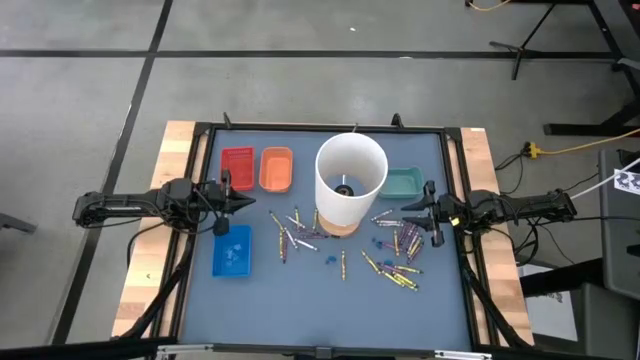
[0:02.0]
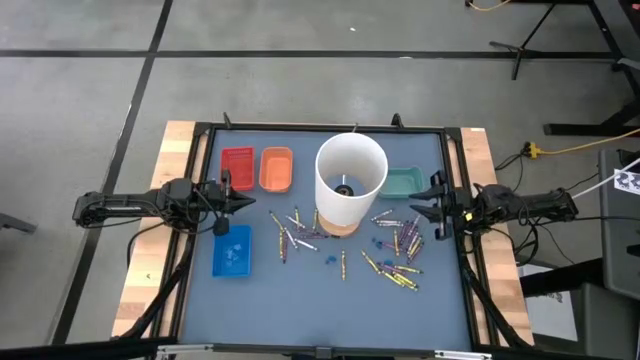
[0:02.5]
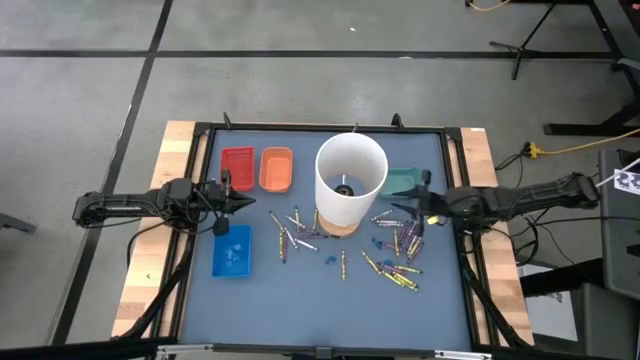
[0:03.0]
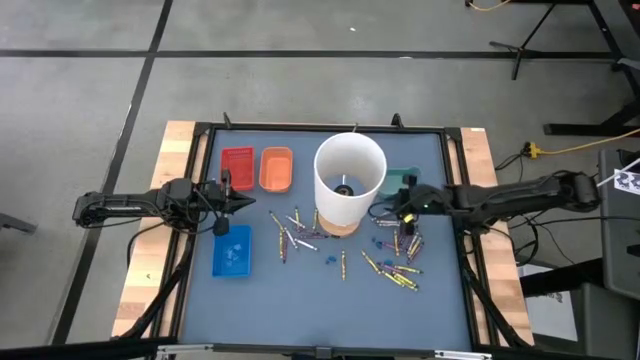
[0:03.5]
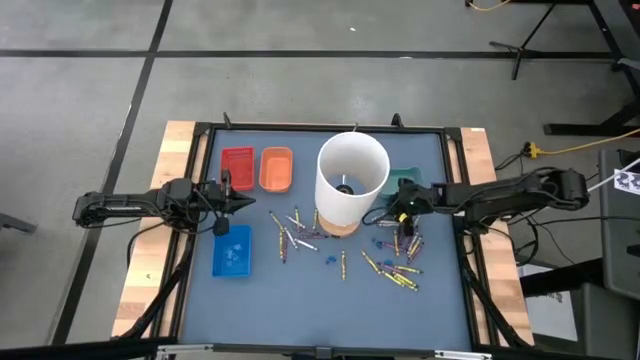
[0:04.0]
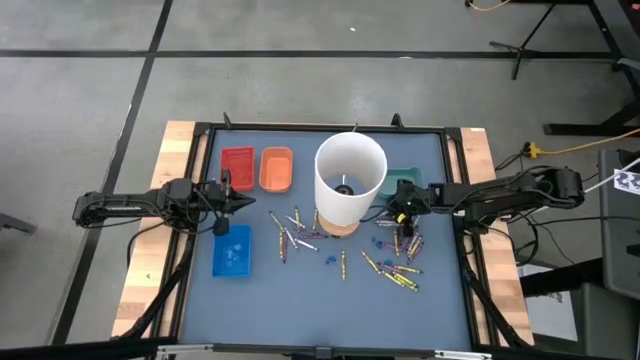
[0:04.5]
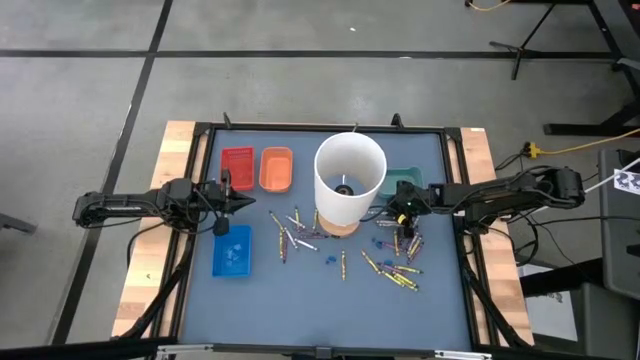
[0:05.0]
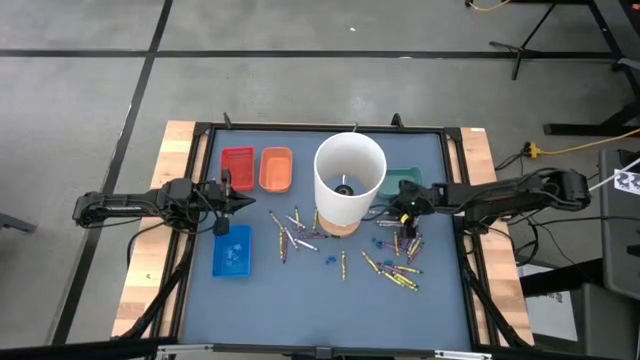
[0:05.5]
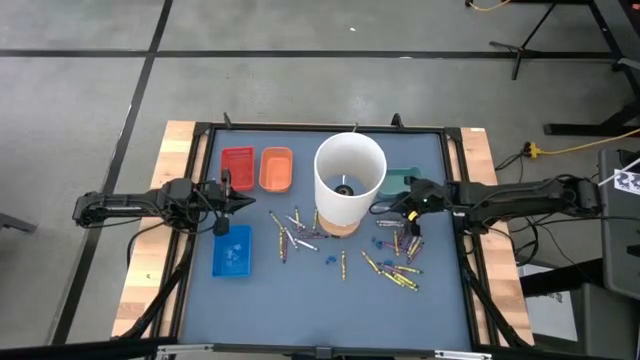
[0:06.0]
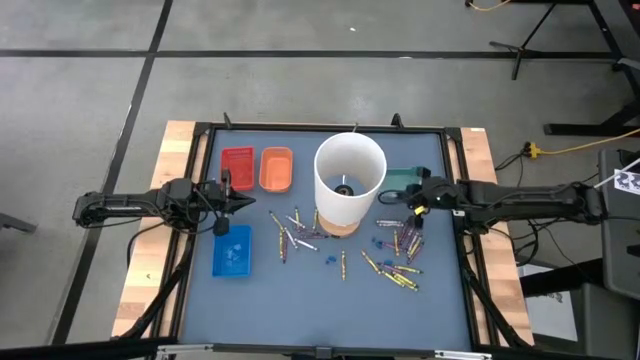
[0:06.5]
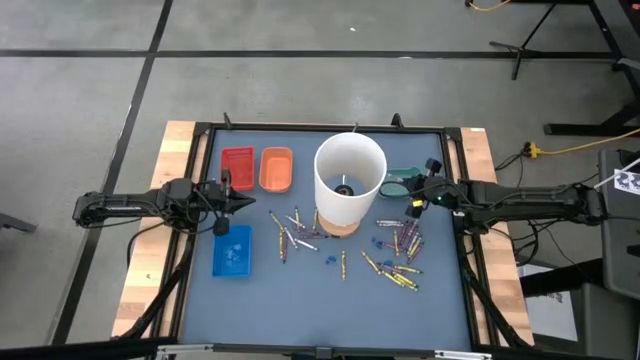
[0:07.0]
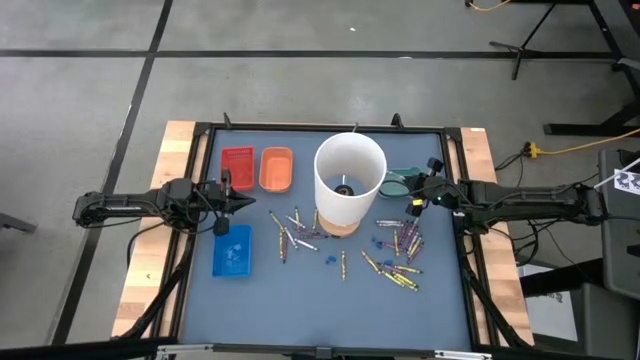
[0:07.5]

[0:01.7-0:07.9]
Task: Sort crayons
Put the gray crayon into the green bin

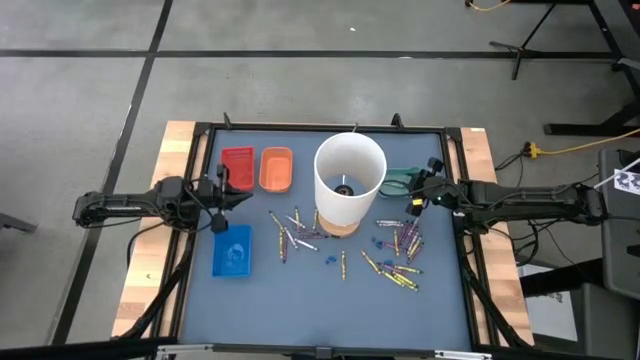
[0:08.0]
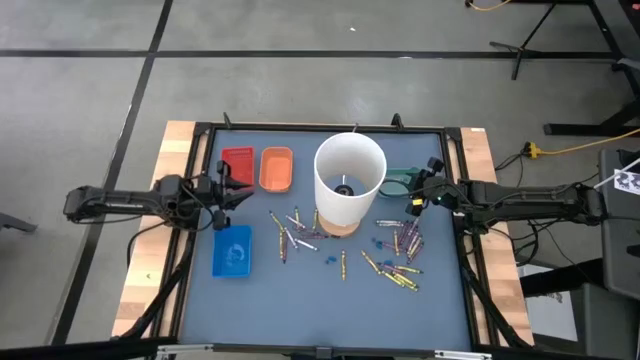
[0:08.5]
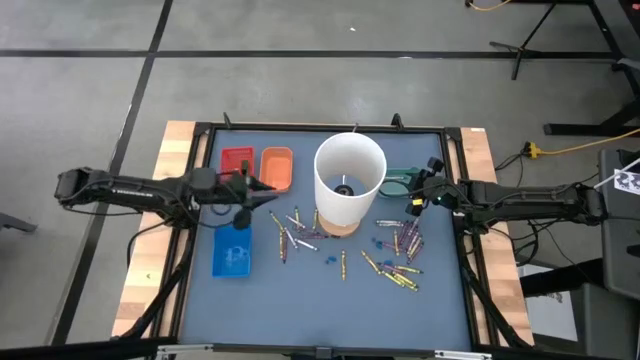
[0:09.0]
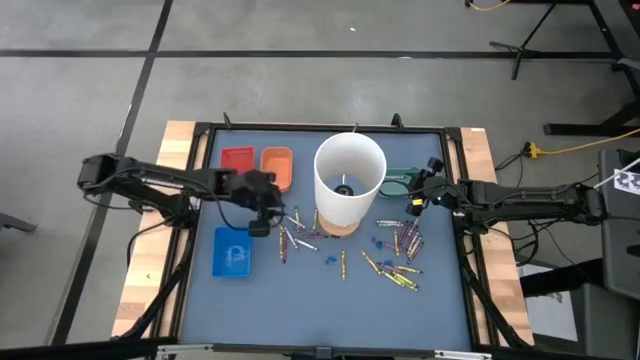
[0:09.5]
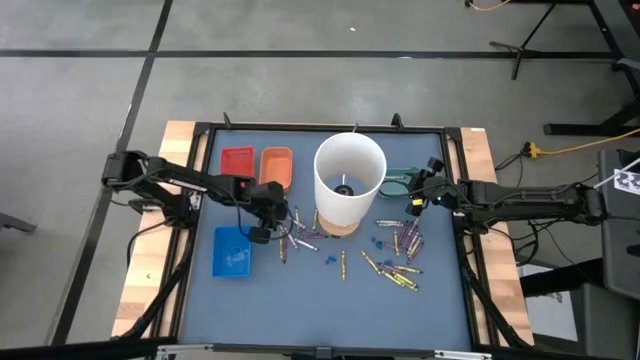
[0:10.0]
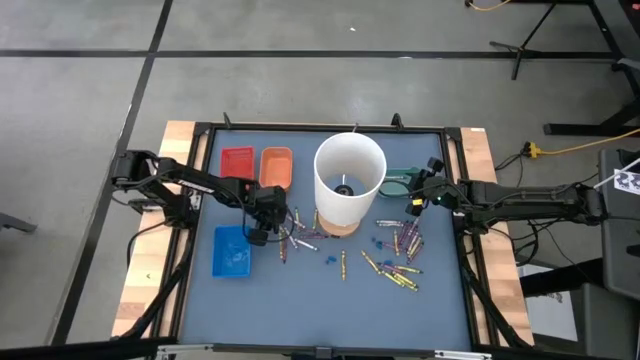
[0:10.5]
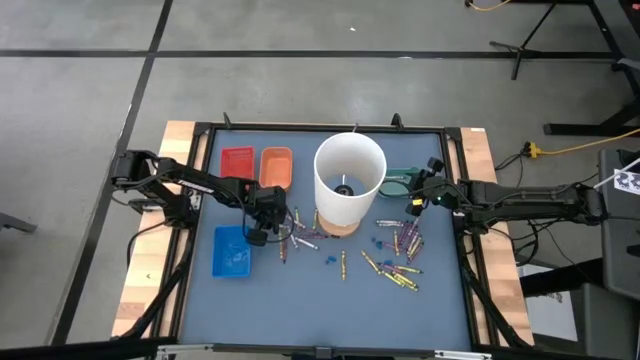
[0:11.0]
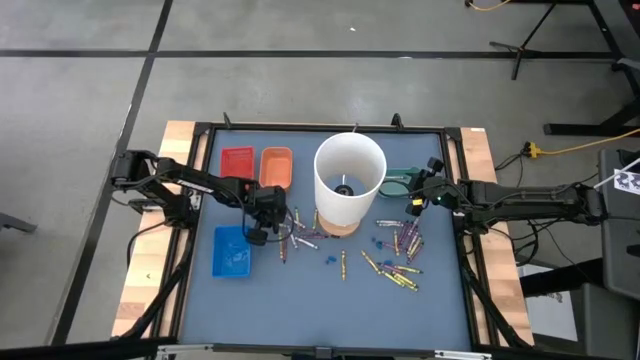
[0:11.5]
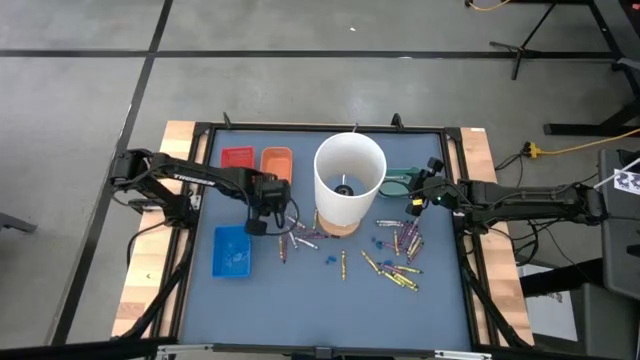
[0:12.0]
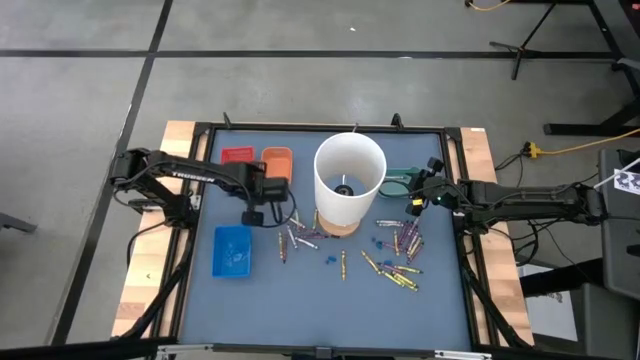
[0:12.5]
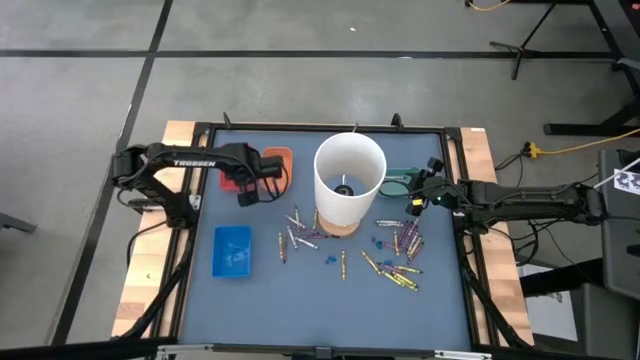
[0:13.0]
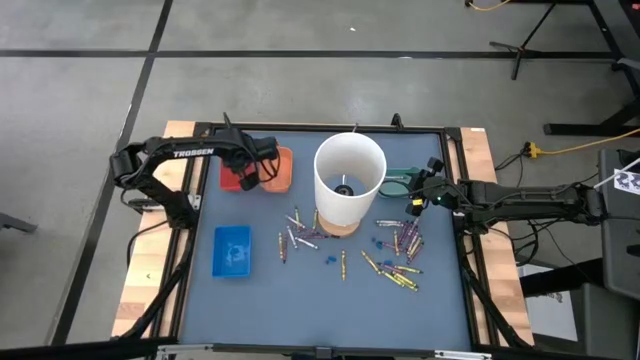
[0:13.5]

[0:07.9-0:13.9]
Put the green crayon into the red bin

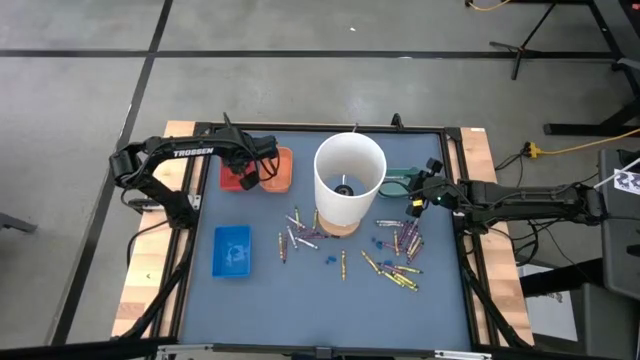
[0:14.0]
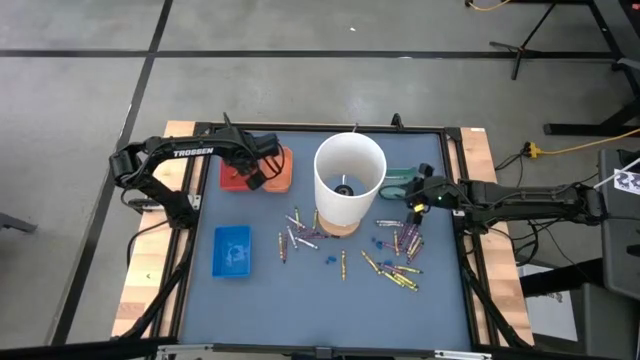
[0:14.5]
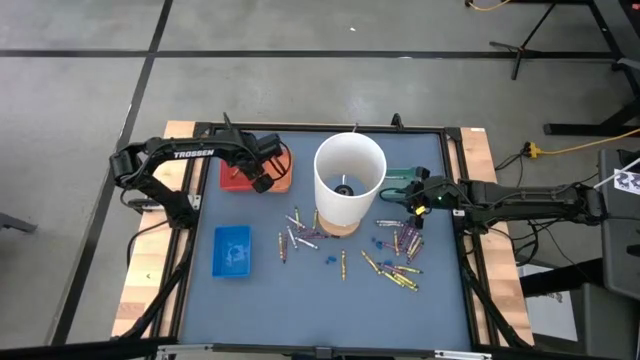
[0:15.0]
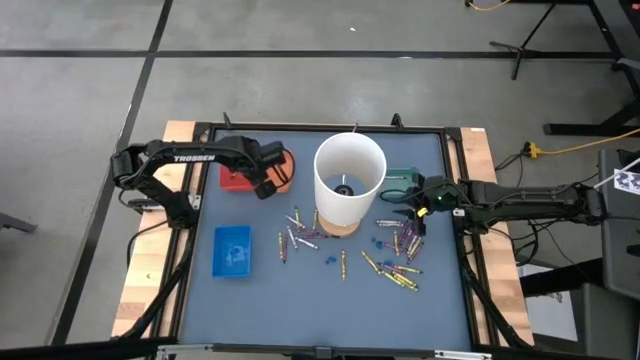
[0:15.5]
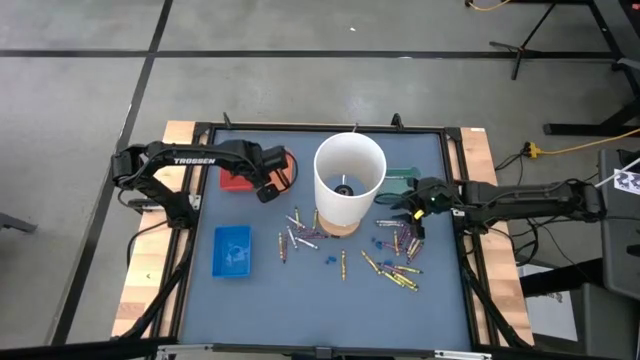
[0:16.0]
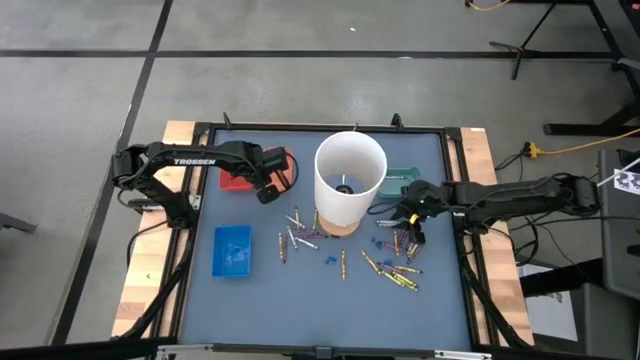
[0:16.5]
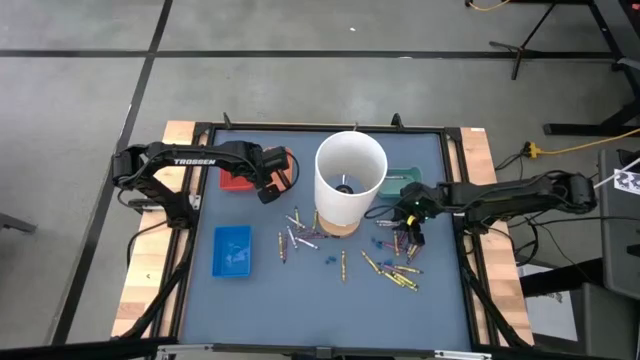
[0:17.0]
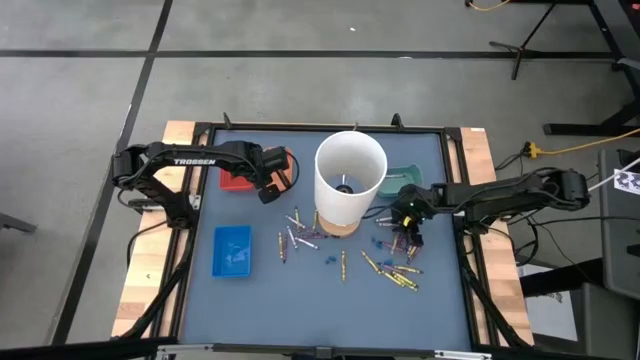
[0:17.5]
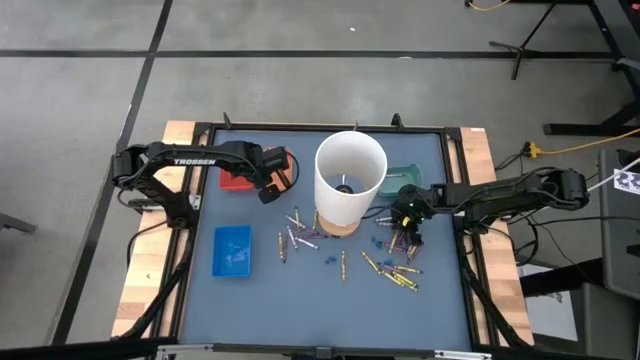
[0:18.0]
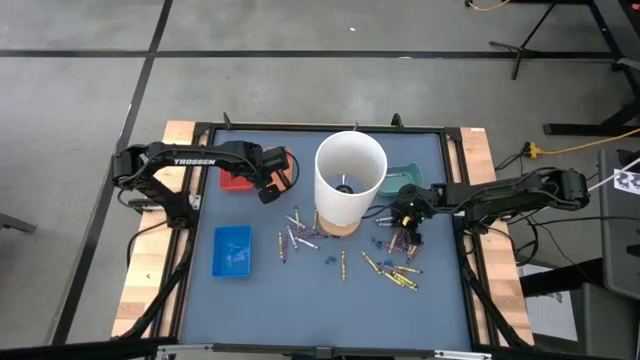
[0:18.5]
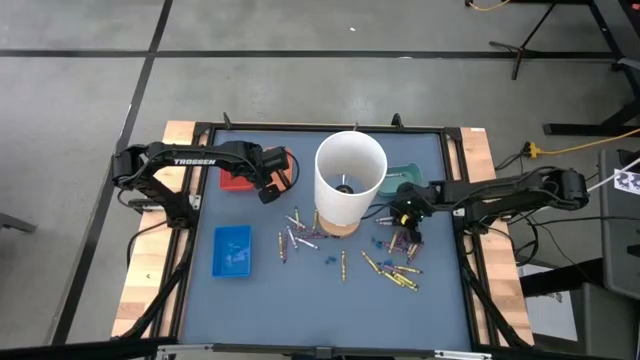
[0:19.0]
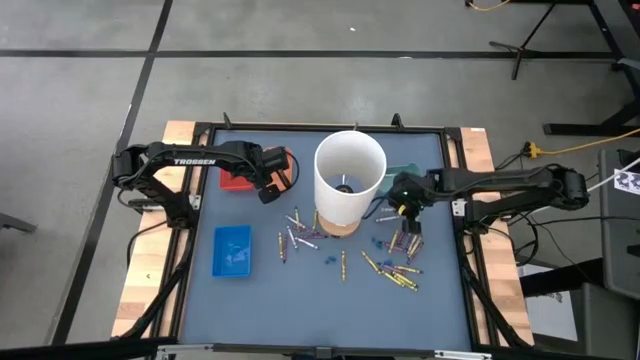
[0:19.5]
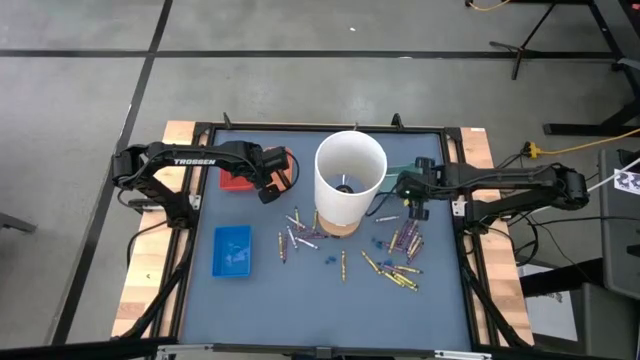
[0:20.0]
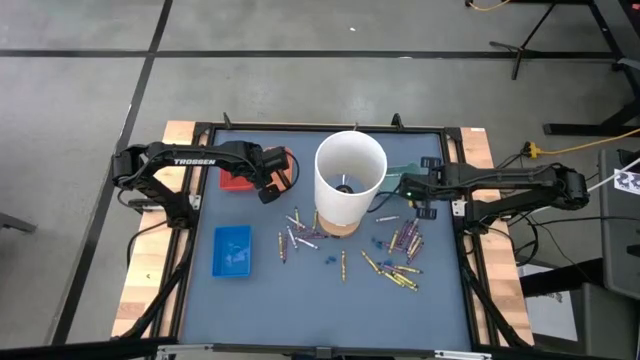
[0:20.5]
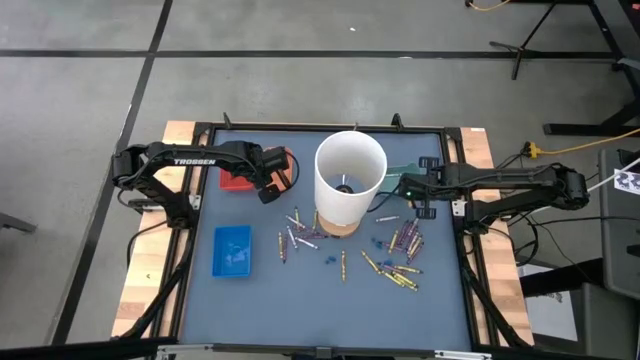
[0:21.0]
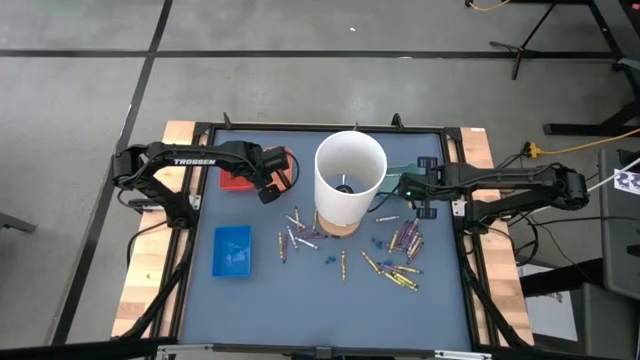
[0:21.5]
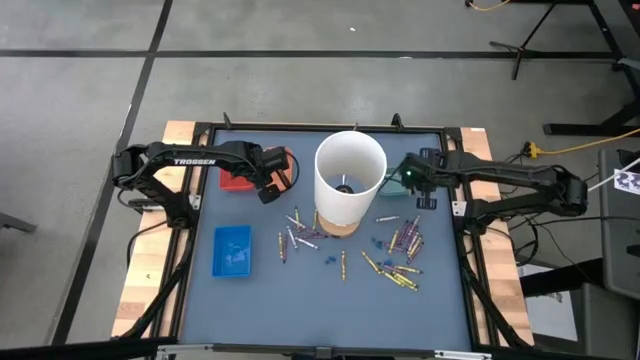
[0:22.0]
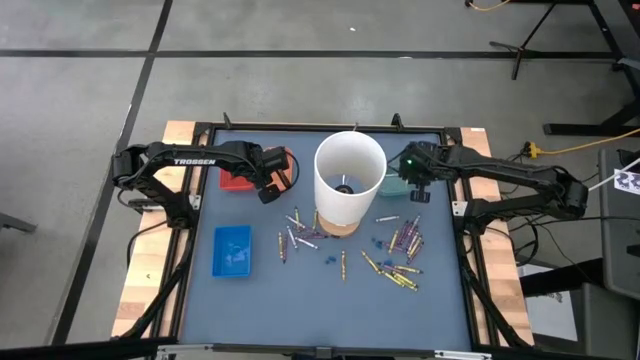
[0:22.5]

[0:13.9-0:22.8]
Put the gray crayon into the green bin
